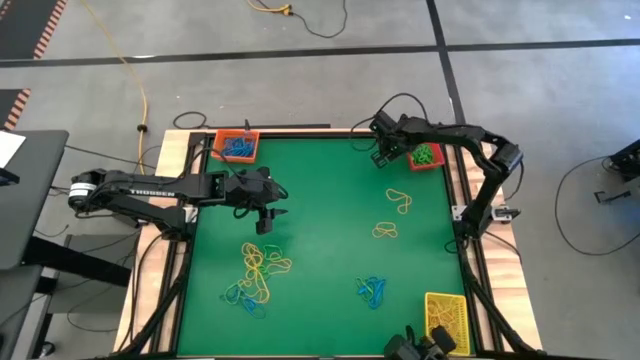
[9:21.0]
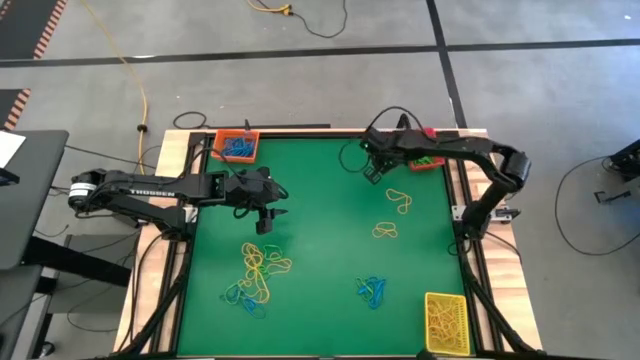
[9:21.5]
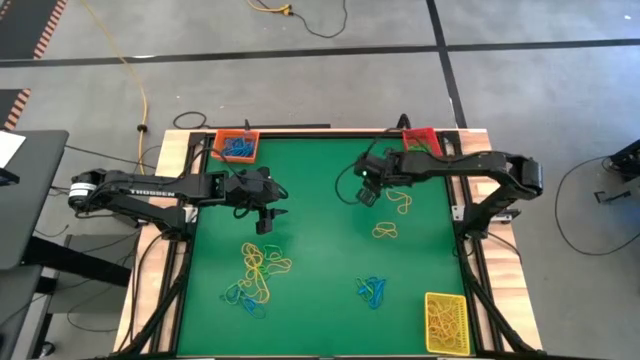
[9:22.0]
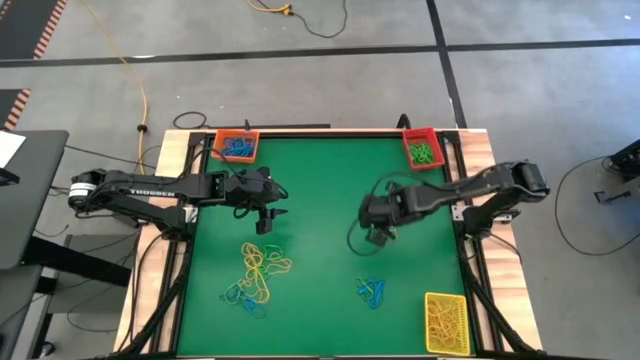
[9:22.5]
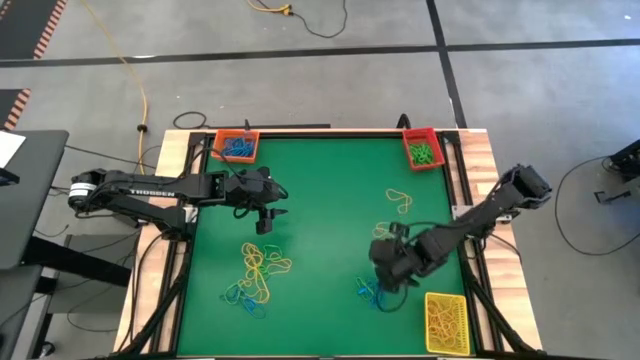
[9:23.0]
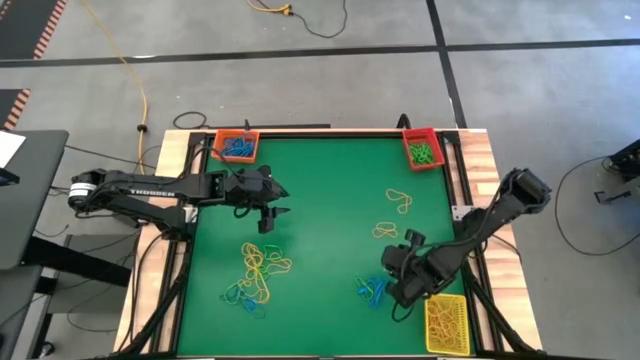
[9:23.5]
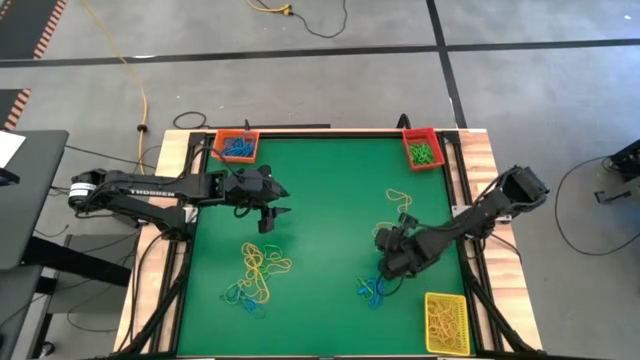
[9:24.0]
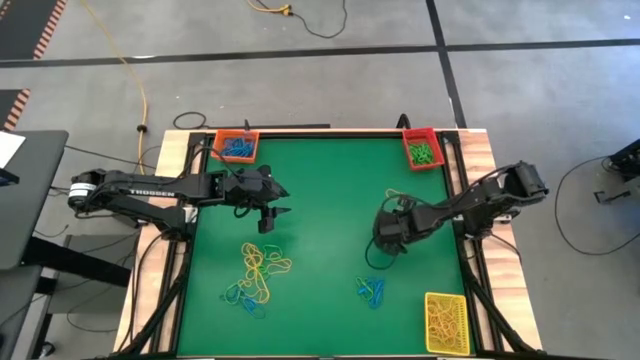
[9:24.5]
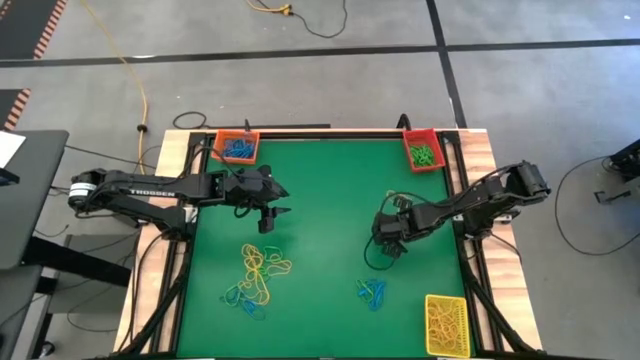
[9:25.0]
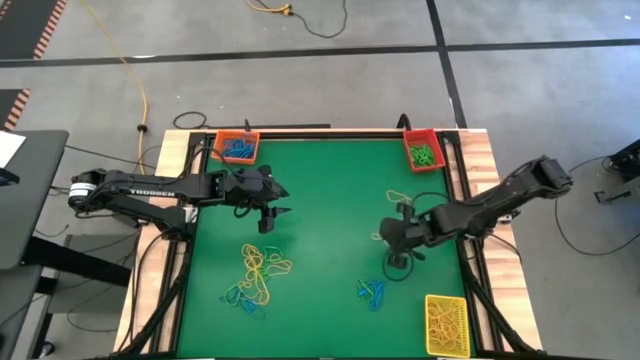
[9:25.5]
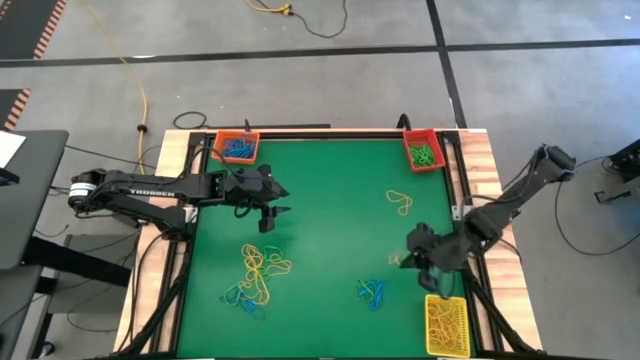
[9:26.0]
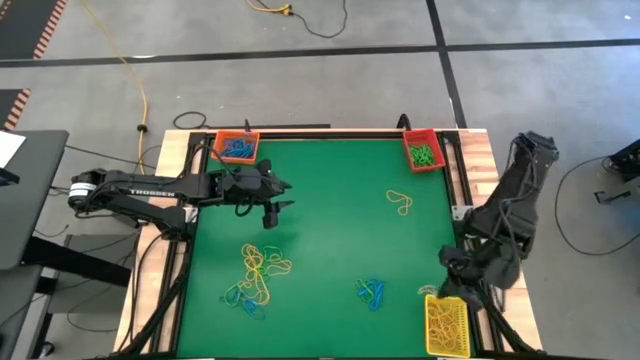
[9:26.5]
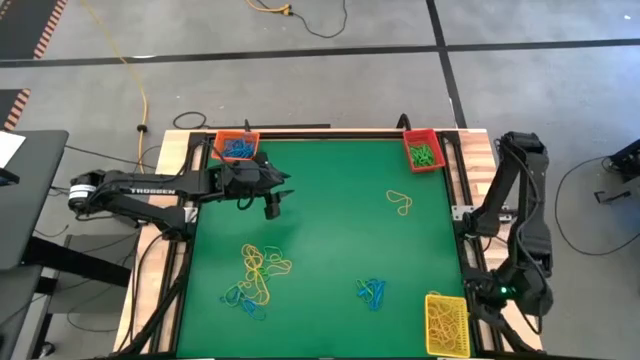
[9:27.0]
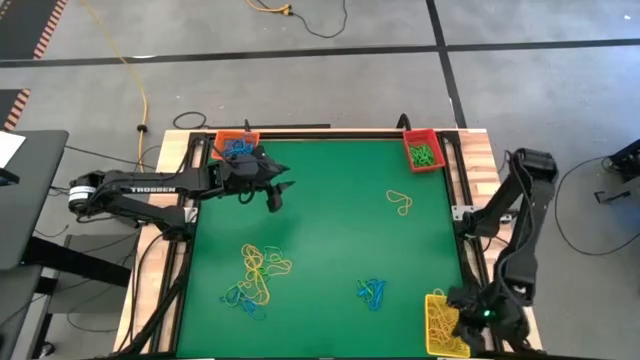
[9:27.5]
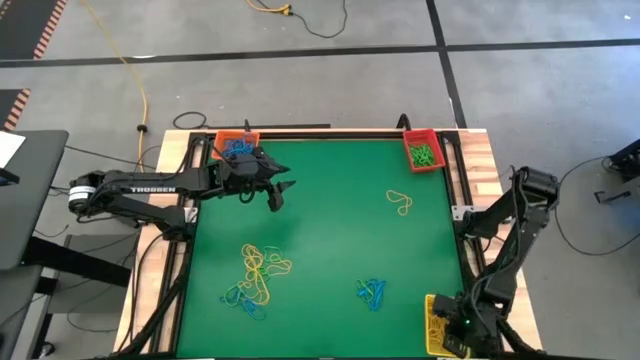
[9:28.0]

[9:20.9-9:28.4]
Task: Sort rubber bands into baskets
Put the top right yellow rubber band into the yellow bin

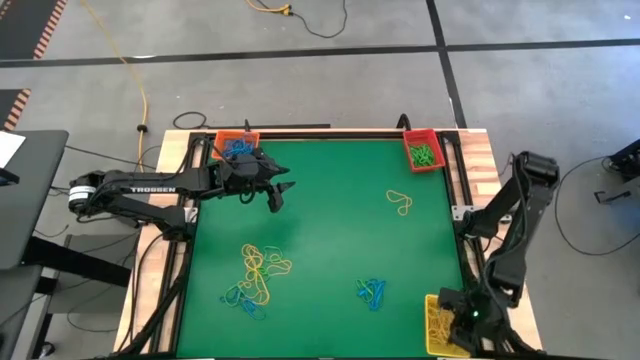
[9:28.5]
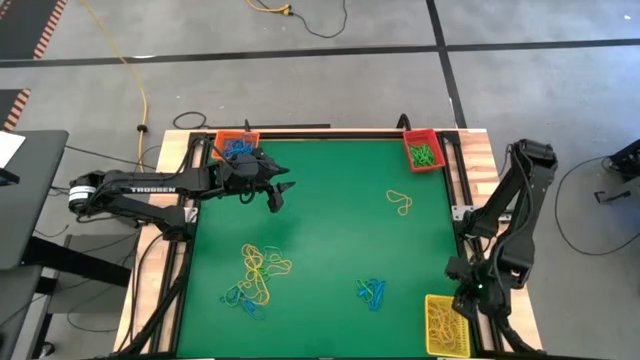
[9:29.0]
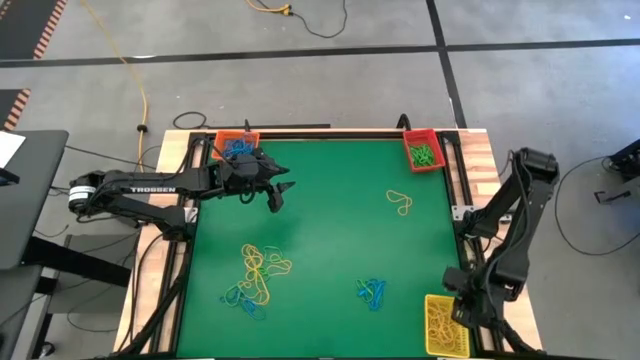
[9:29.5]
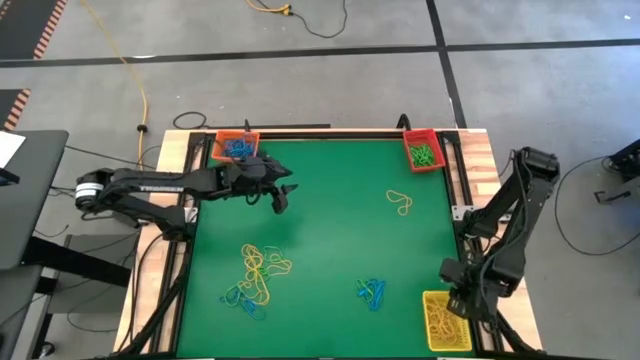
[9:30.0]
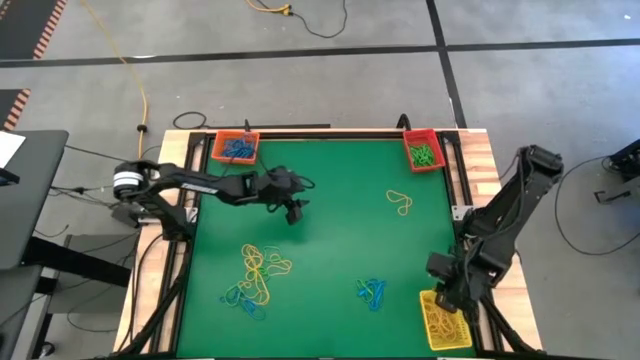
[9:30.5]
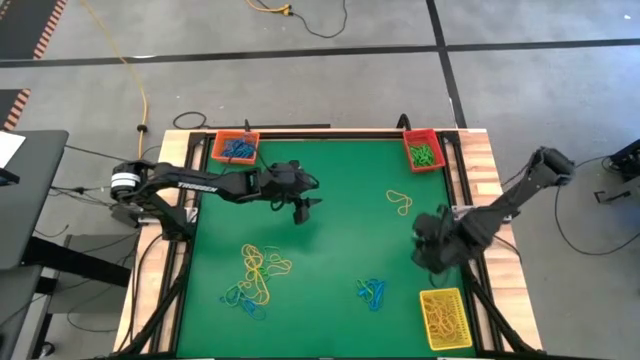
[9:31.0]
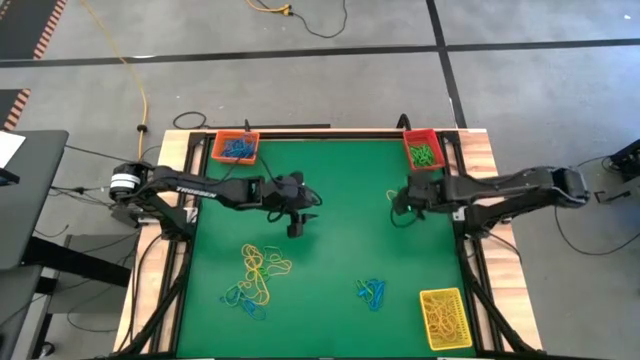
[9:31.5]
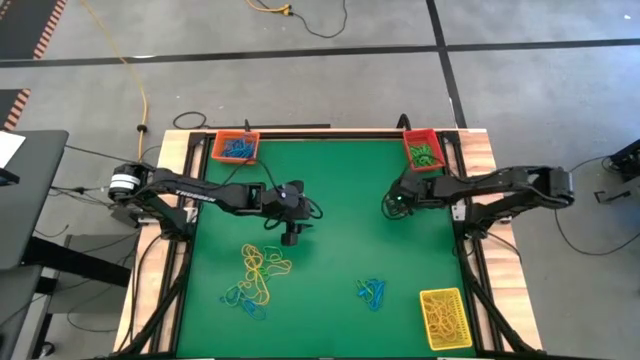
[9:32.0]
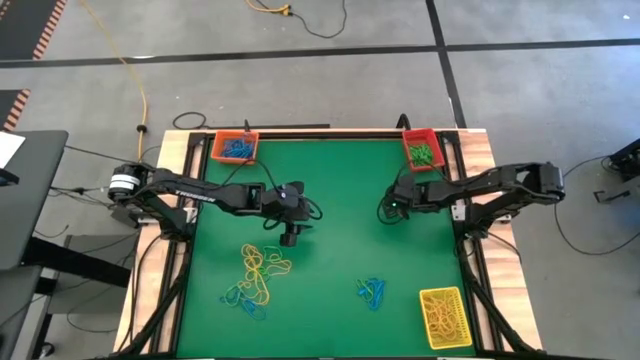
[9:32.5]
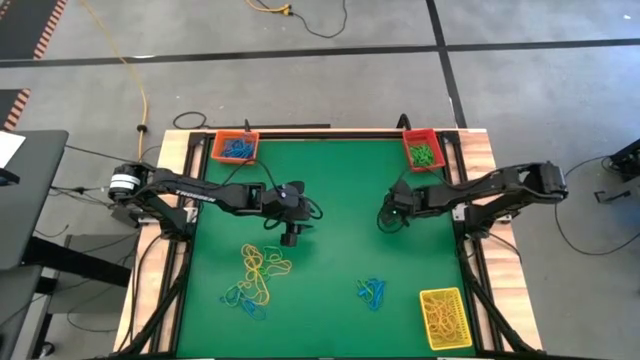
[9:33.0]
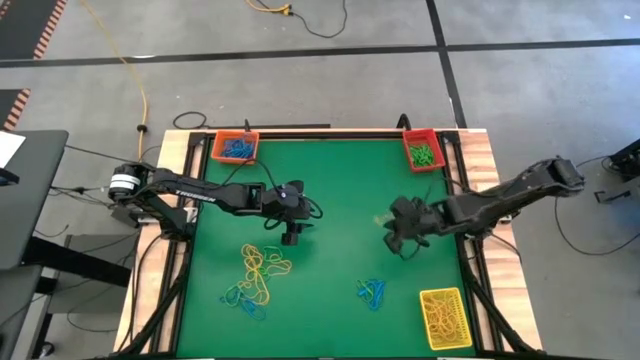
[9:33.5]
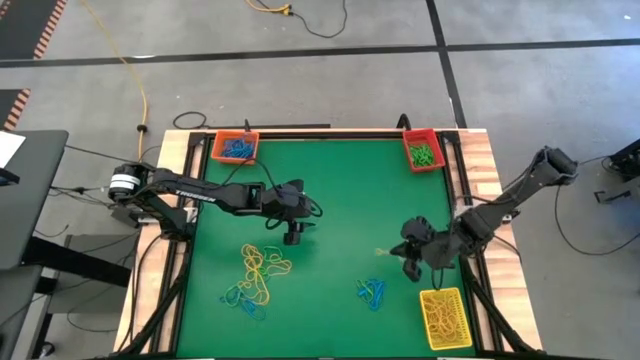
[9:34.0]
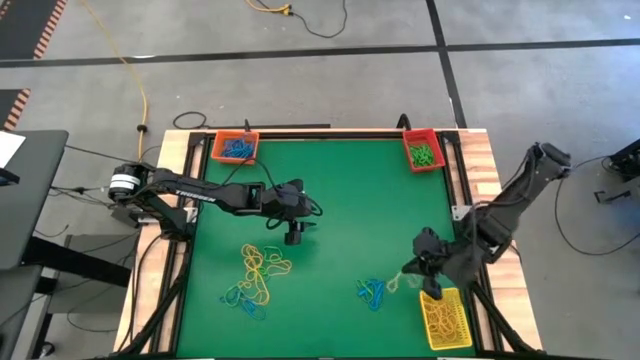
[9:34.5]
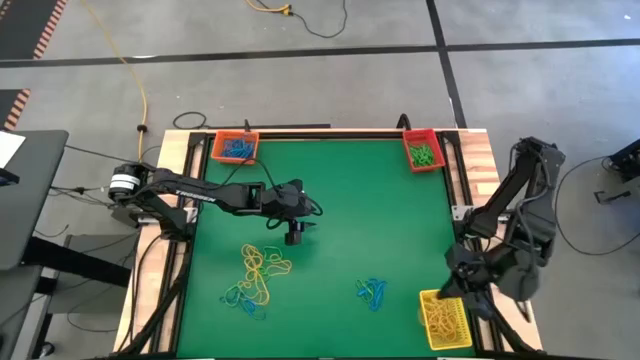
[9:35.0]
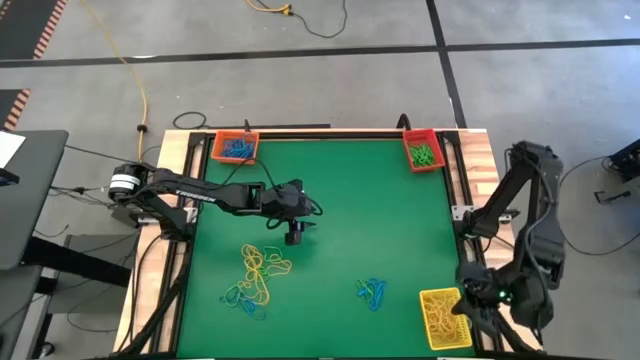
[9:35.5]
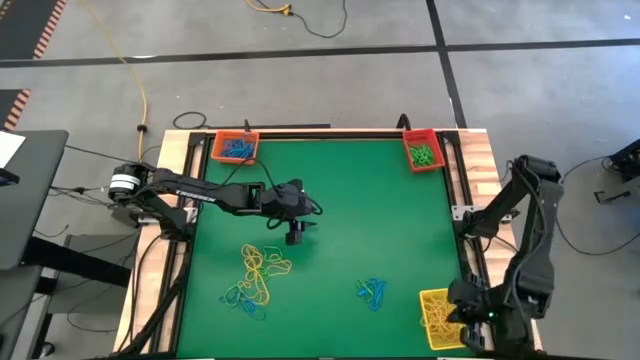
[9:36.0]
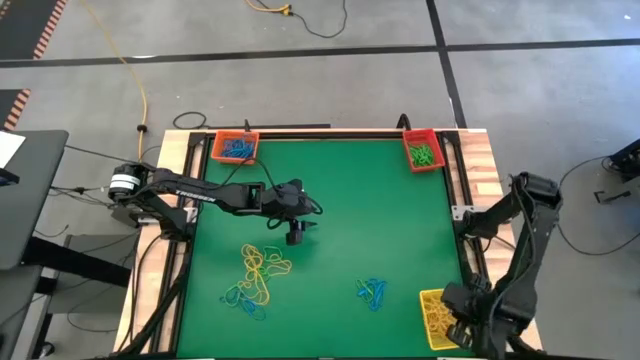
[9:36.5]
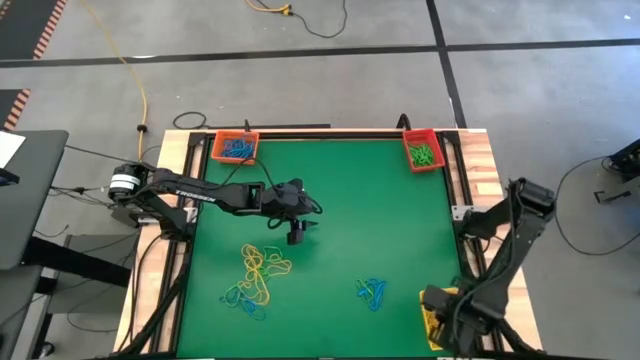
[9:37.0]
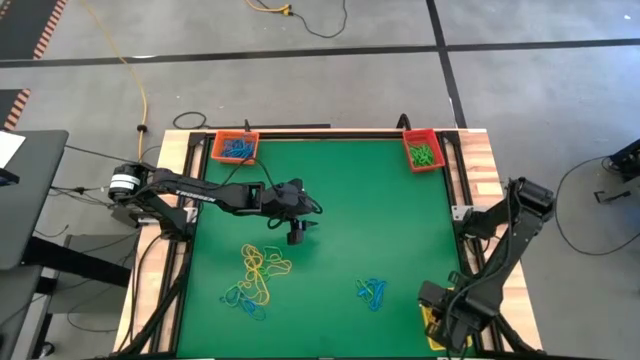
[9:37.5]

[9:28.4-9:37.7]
Put the top right yellow rubber band into the yellow bin
